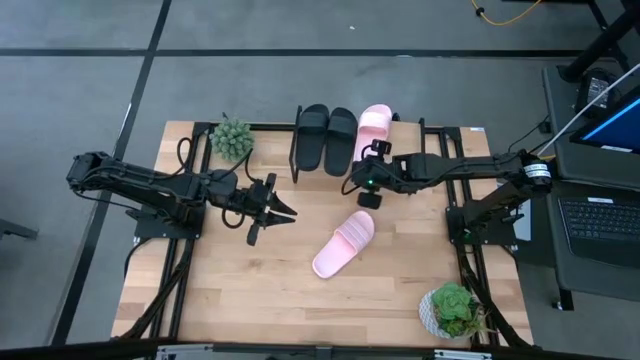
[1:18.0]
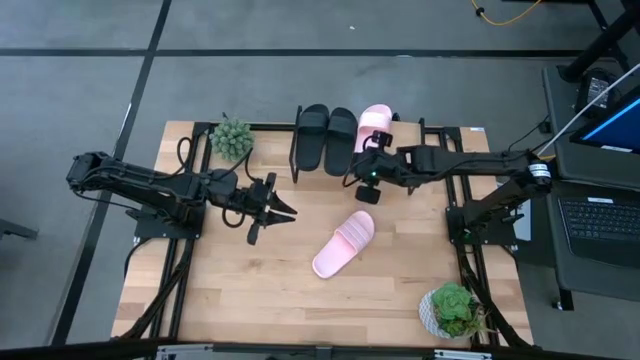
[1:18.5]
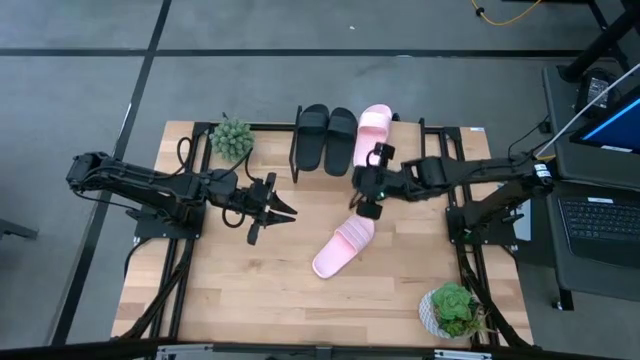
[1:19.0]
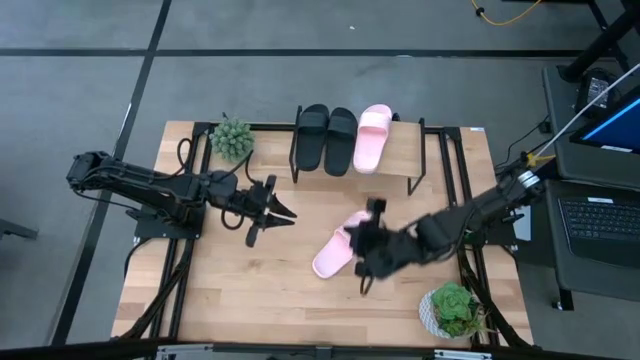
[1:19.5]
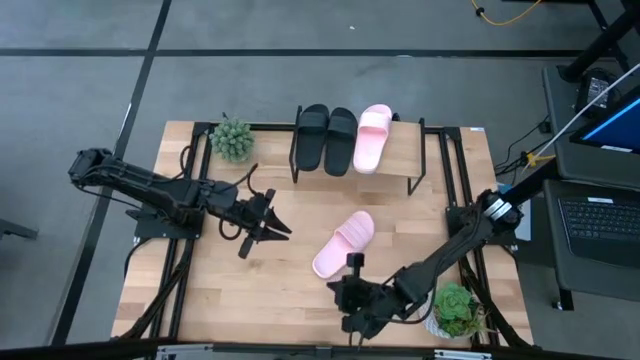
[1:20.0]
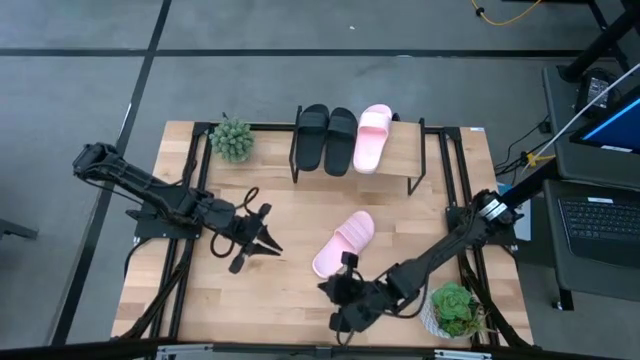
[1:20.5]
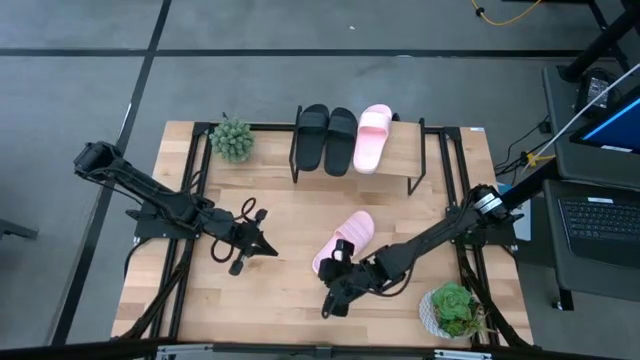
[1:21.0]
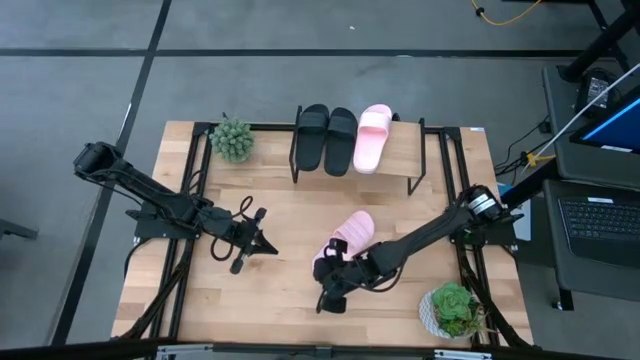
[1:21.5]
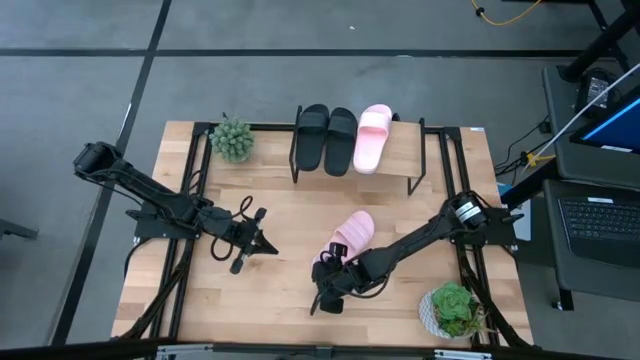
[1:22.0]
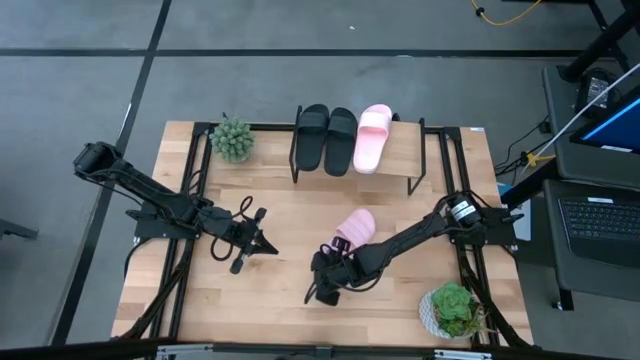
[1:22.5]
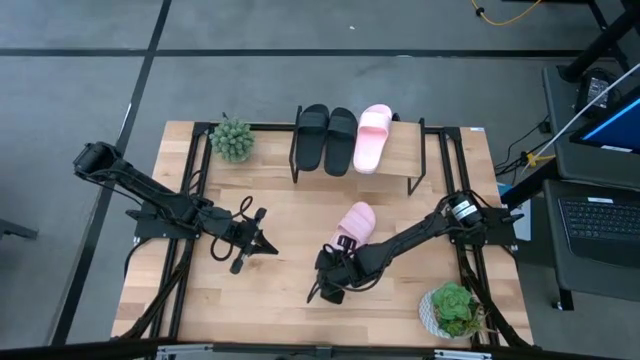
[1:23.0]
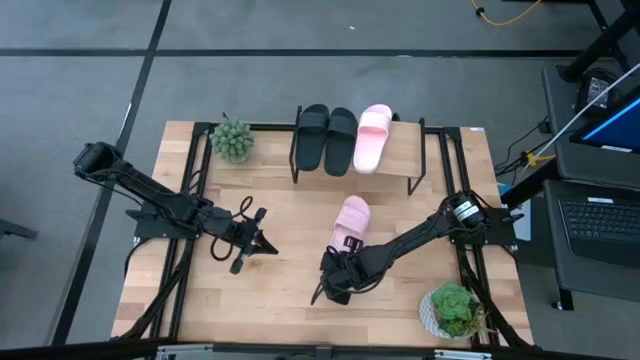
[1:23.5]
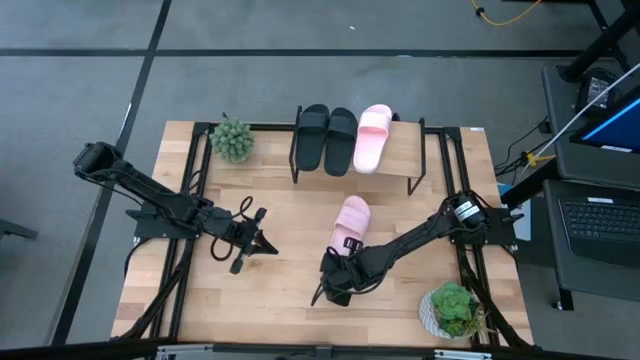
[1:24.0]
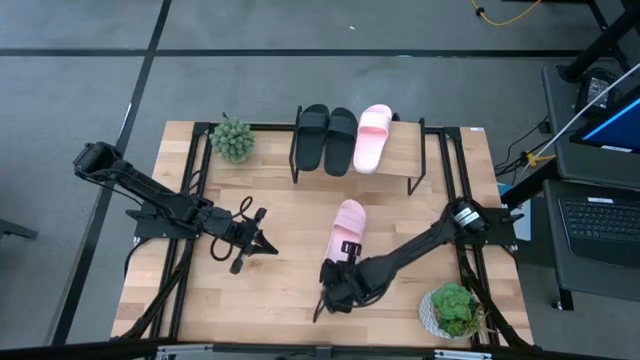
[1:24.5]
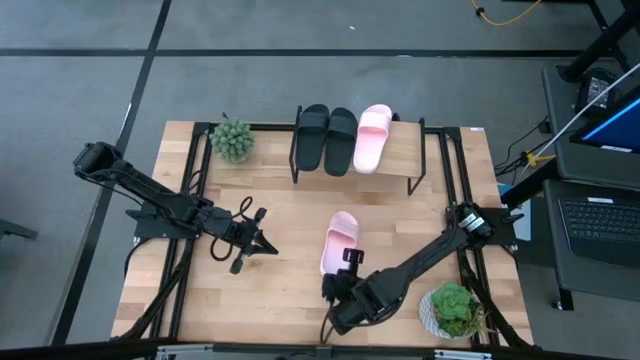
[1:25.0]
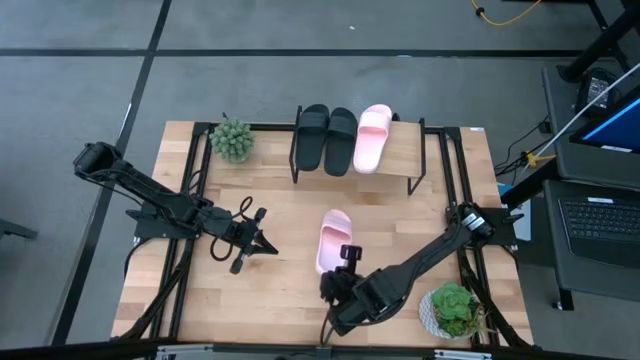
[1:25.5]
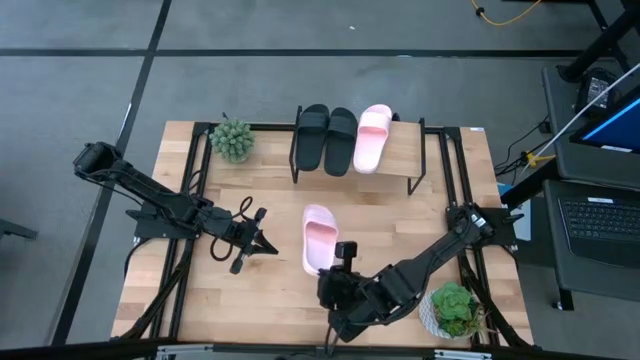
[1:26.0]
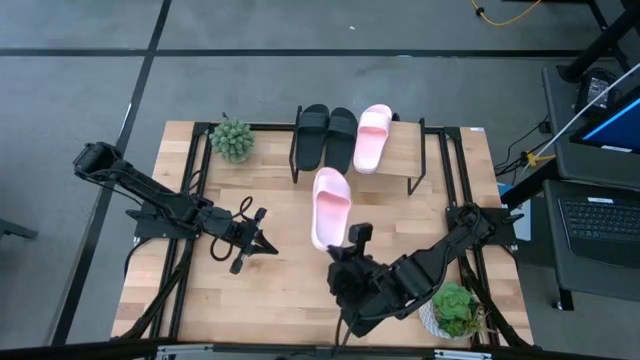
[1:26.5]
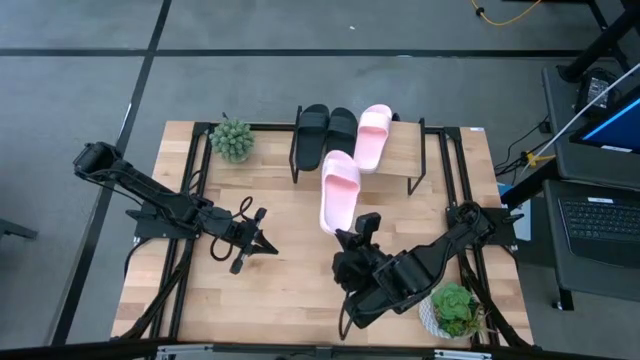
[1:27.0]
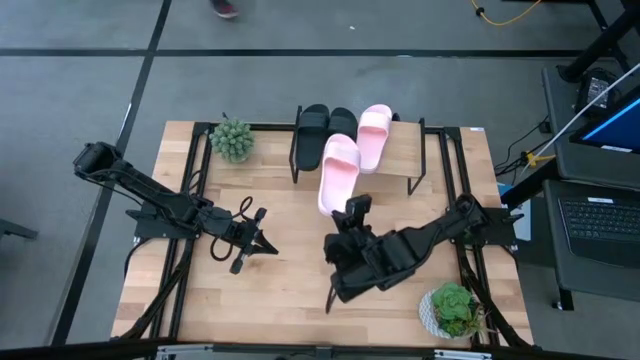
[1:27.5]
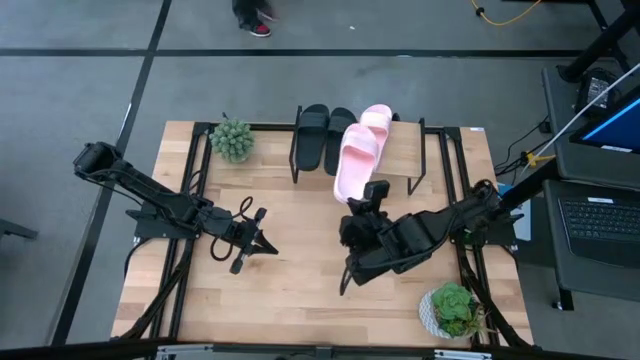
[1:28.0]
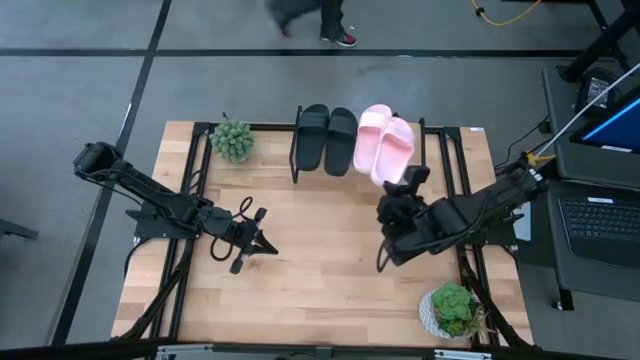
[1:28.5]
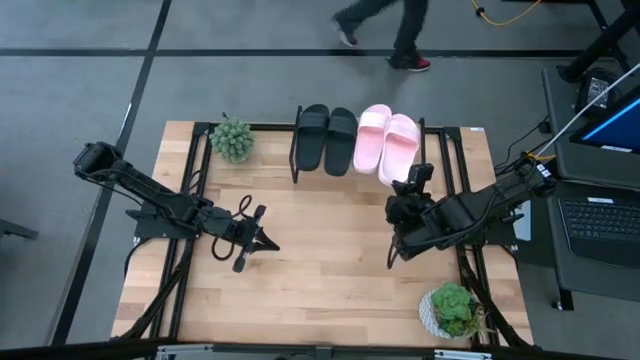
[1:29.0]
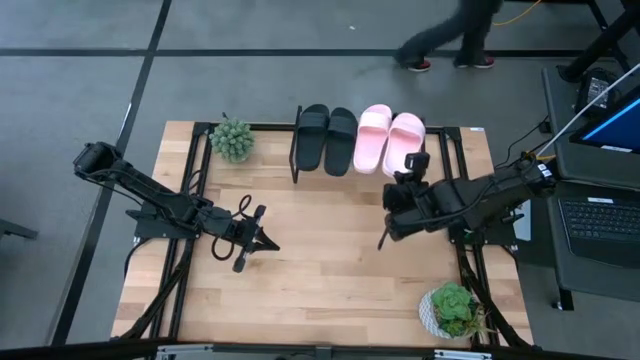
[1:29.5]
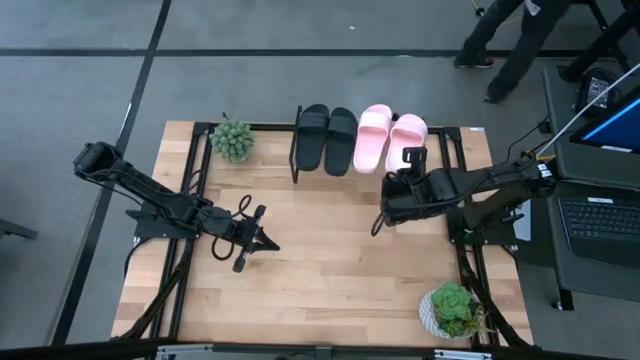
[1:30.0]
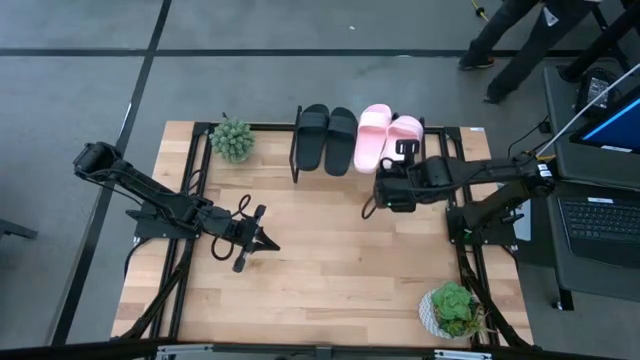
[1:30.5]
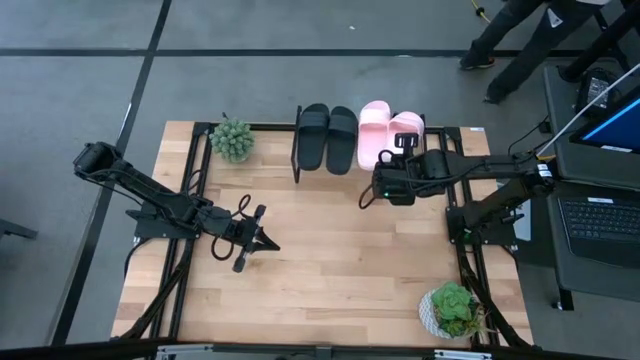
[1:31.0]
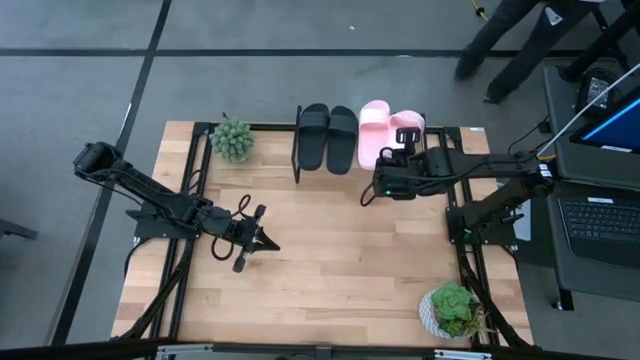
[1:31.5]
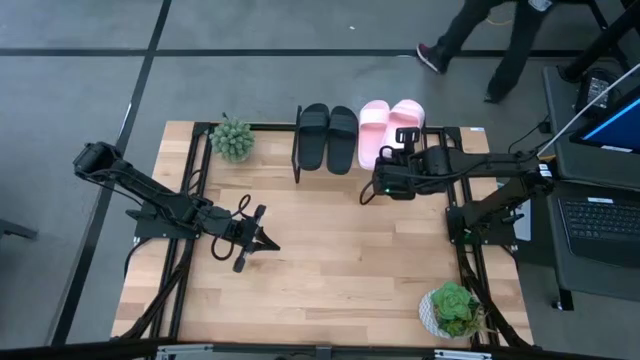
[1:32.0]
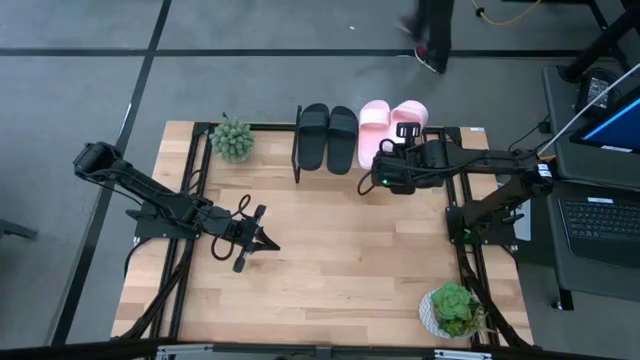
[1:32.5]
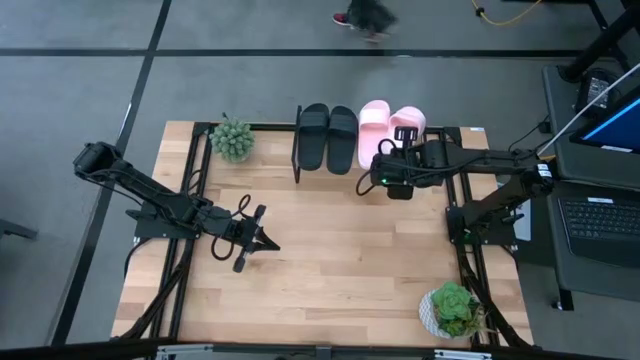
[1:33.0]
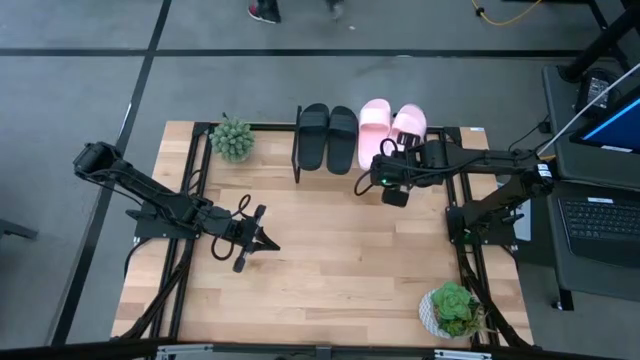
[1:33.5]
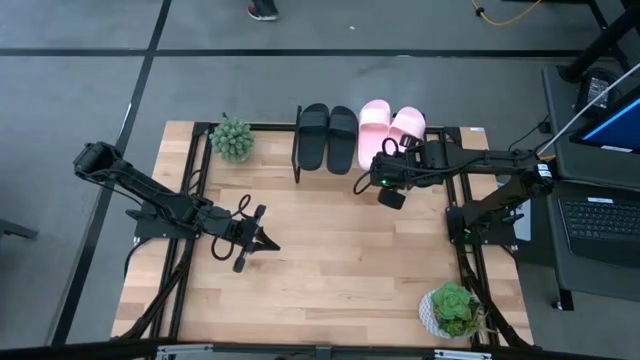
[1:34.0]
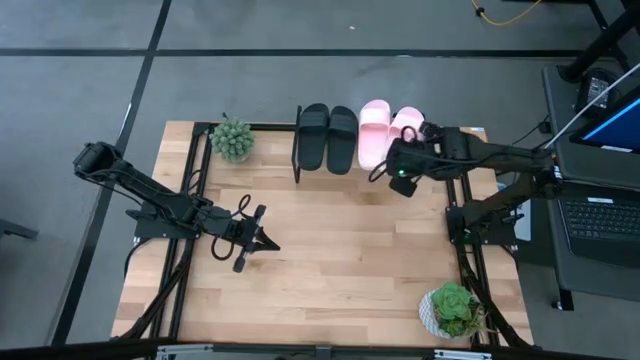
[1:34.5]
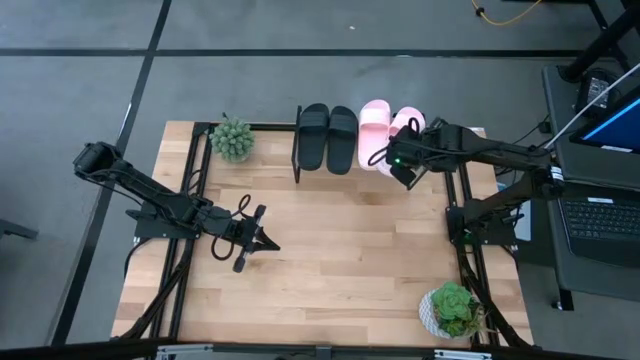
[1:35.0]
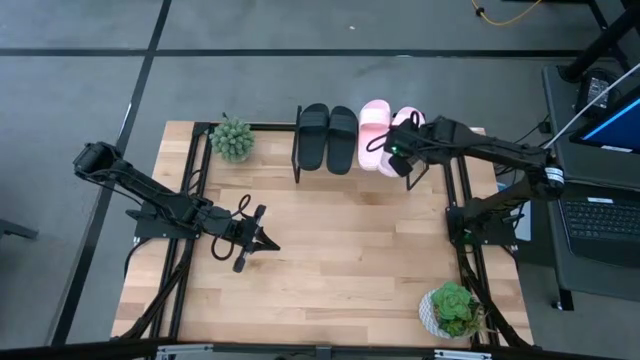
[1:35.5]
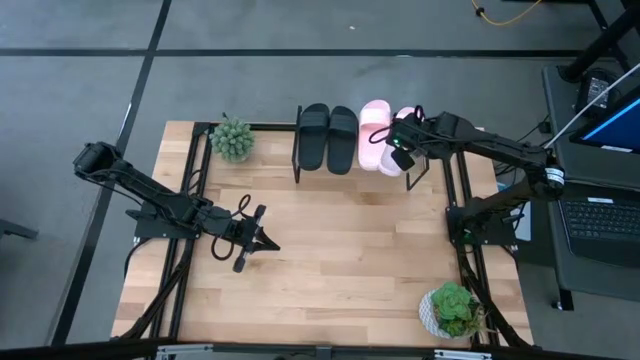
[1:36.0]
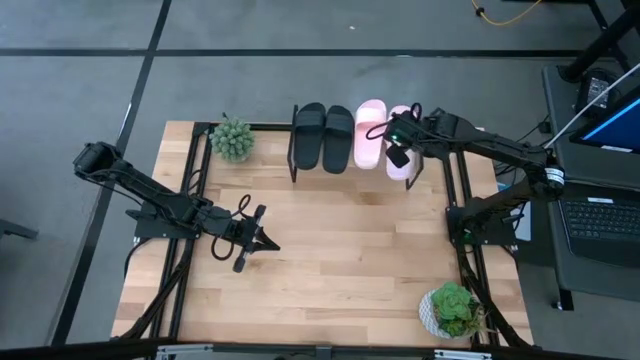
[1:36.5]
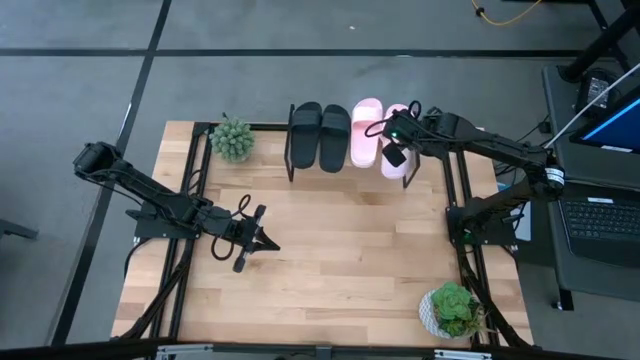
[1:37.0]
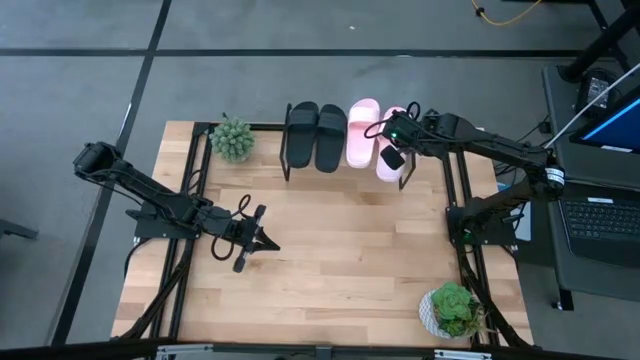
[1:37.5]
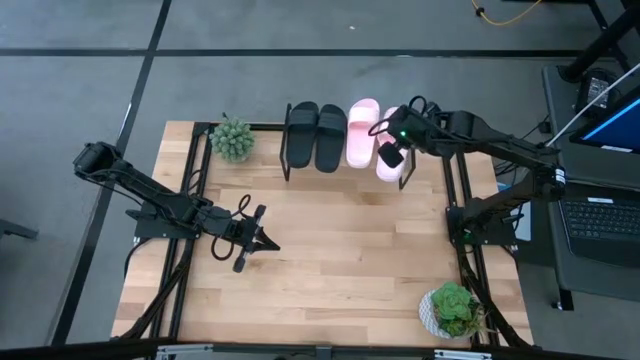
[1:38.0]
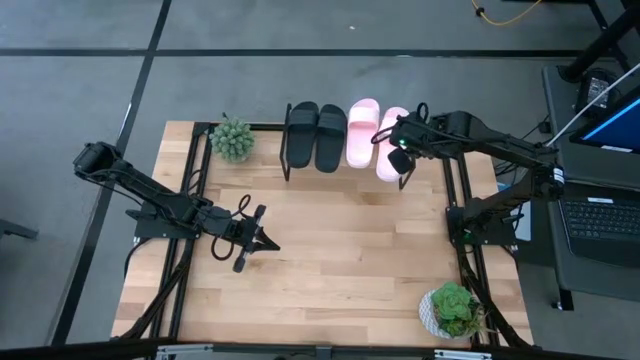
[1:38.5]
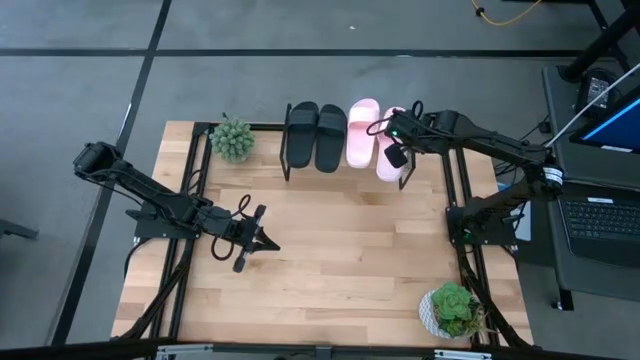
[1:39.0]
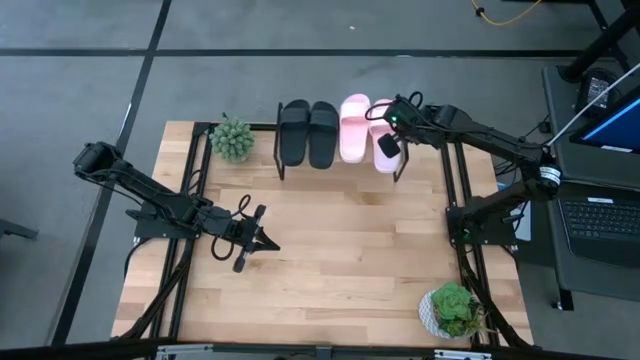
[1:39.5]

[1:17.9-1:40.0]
Task: Pick and place slides into the shelf
Put the pink slide on the shelf
